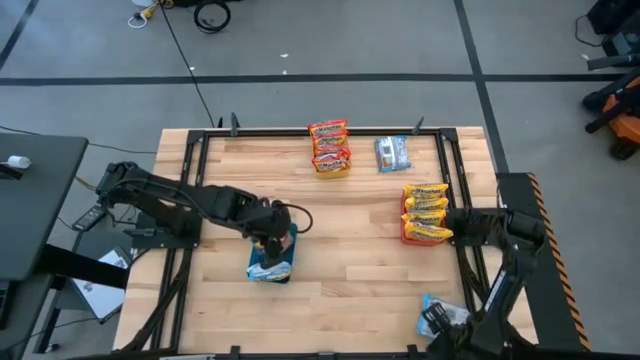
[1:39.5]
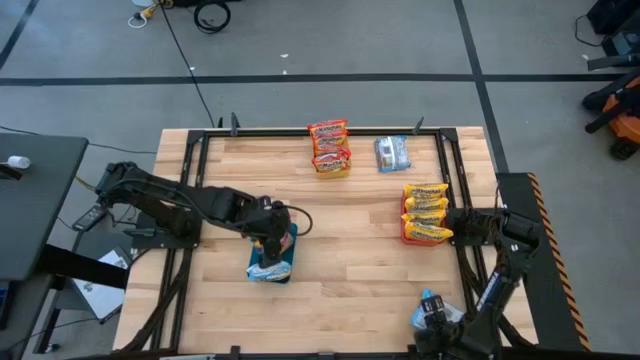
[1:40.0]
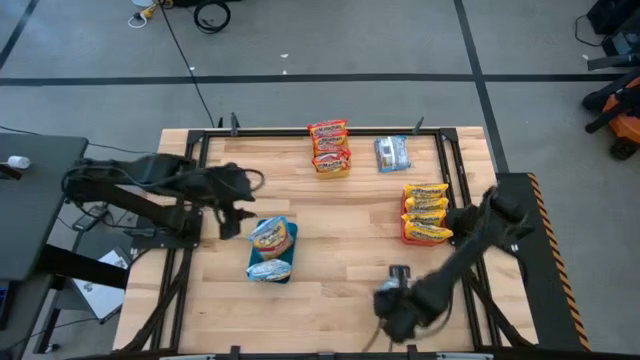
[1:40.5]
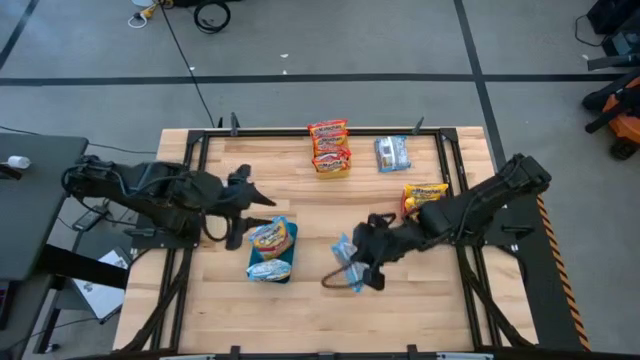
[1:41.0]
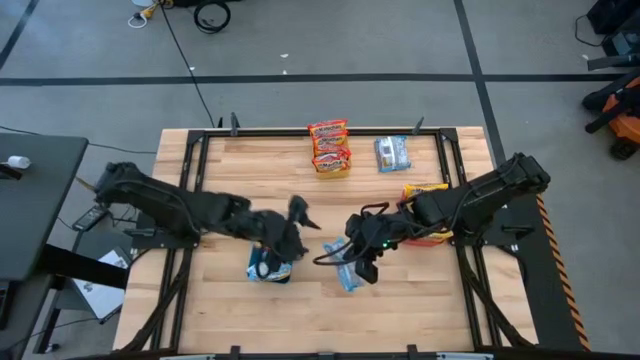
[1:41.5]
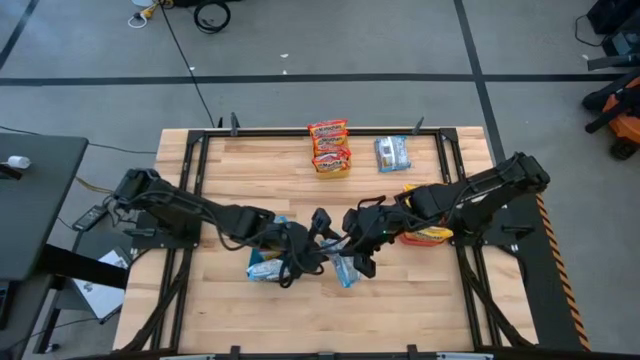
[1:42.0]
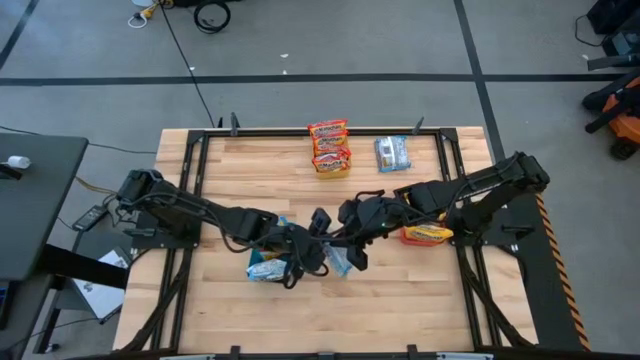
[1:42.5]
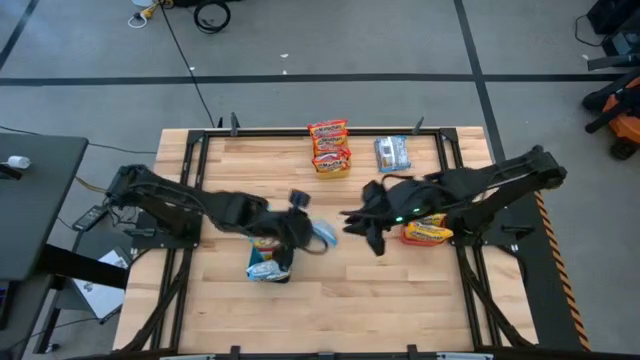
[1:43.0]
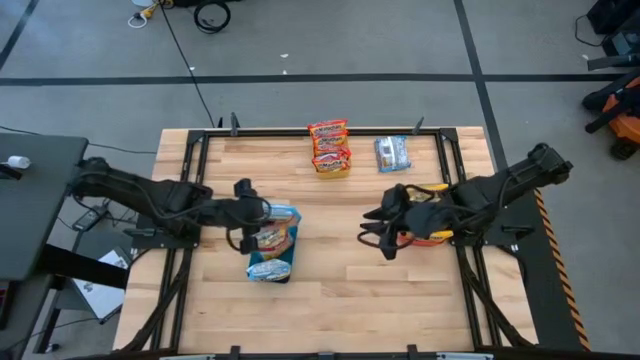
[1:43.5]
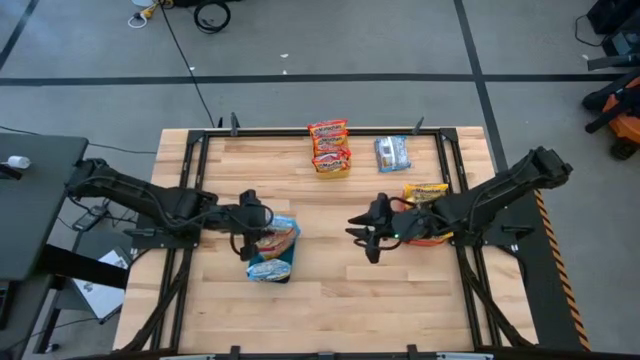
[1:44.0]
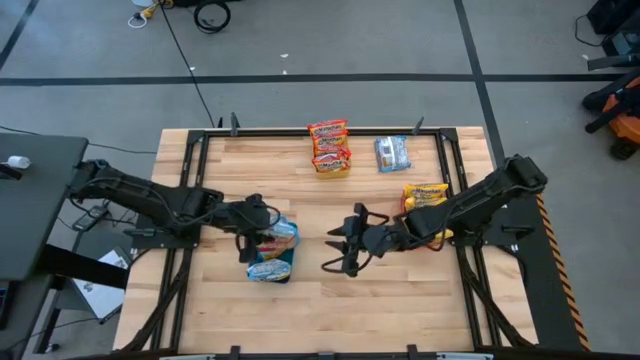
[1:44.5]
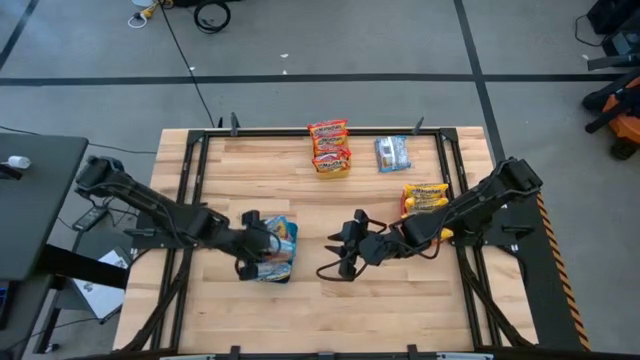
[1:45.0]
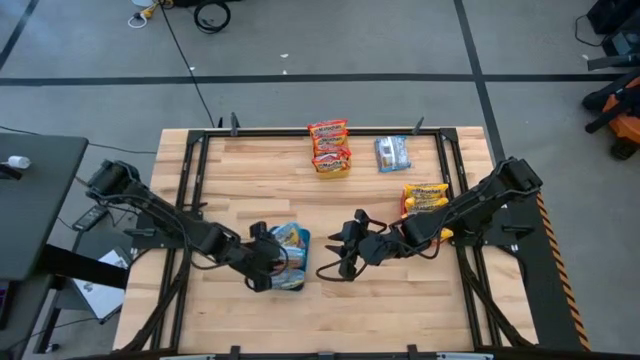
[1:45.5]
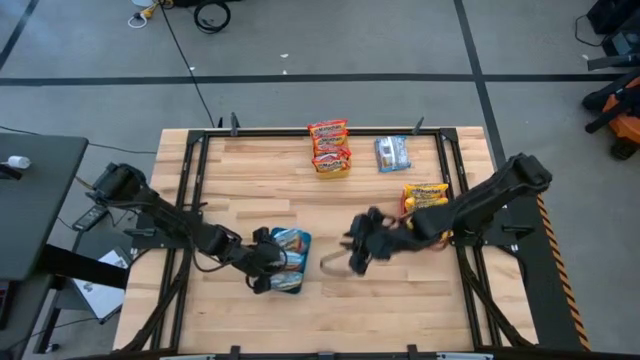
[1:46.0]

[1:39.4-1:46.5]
Task: Sort Maruchan noodles
Put the bottom blue noodle pack into the blue bin

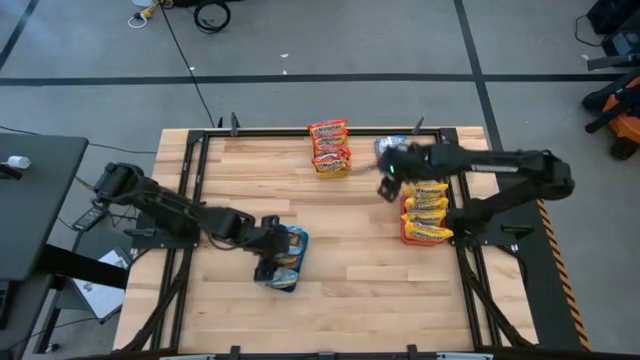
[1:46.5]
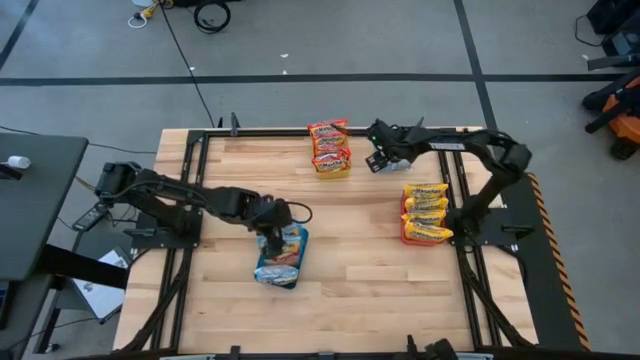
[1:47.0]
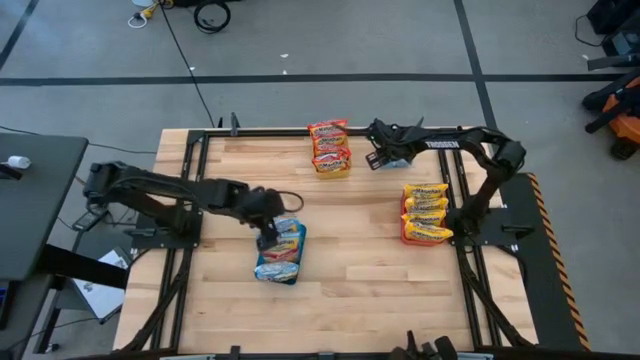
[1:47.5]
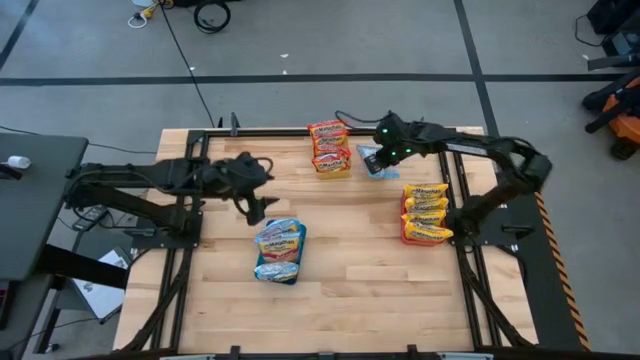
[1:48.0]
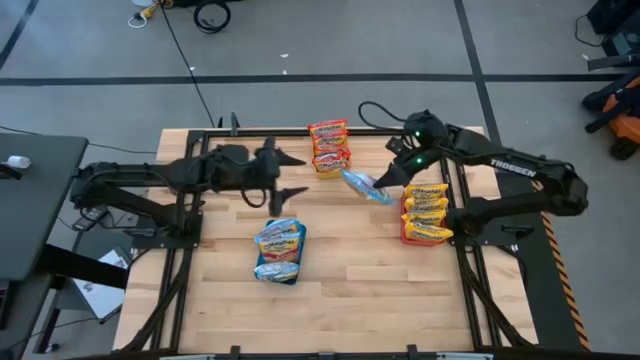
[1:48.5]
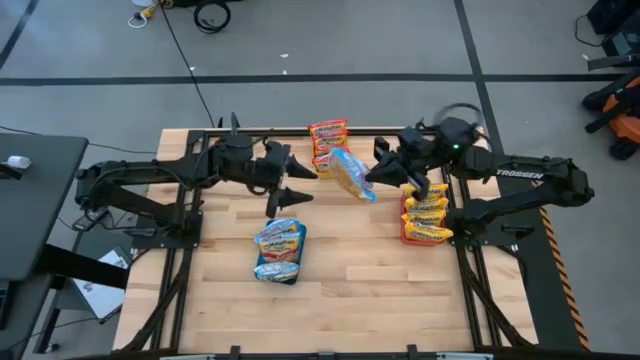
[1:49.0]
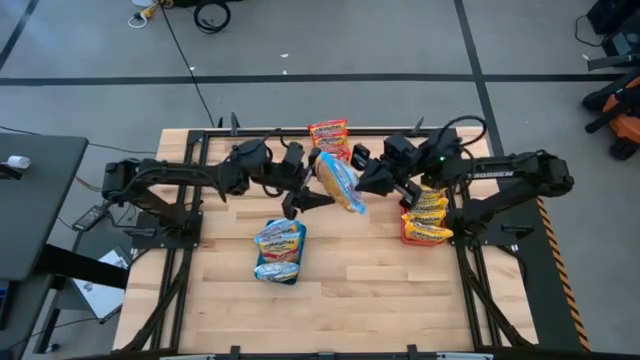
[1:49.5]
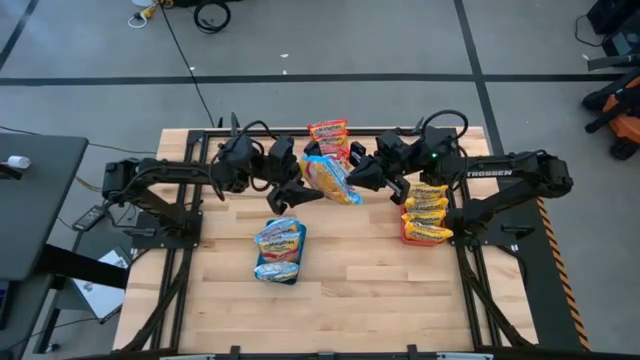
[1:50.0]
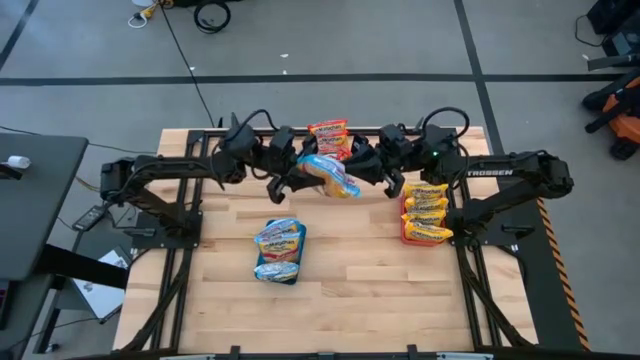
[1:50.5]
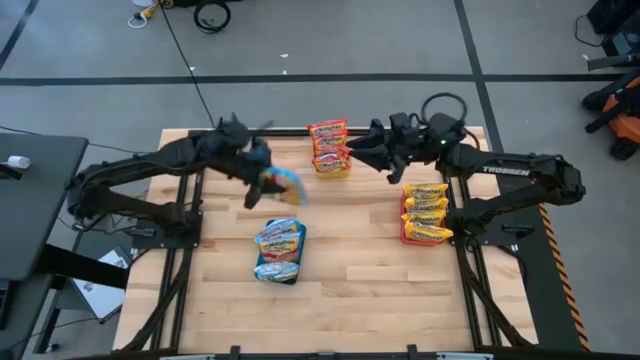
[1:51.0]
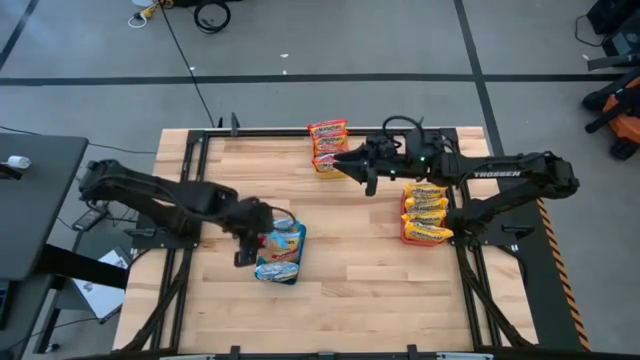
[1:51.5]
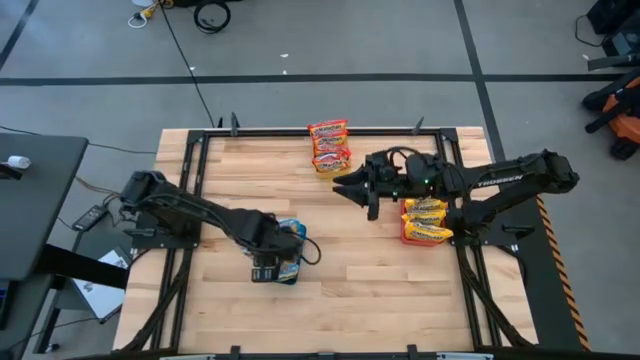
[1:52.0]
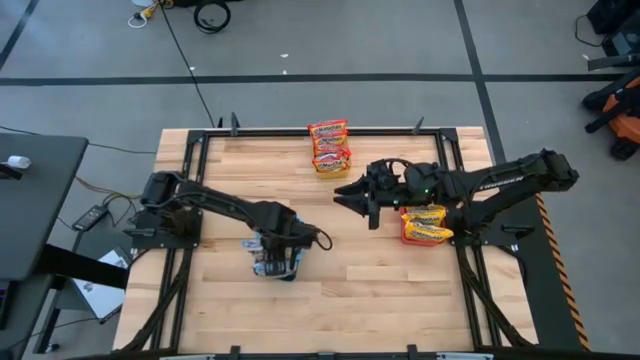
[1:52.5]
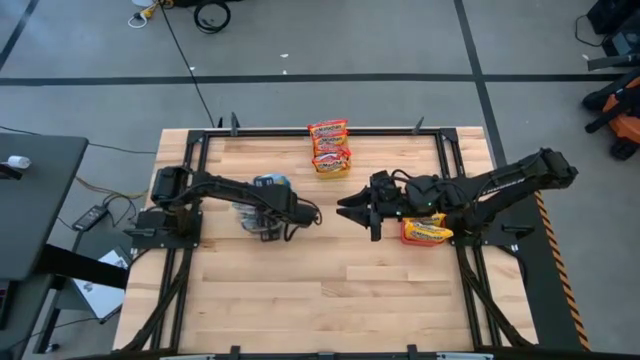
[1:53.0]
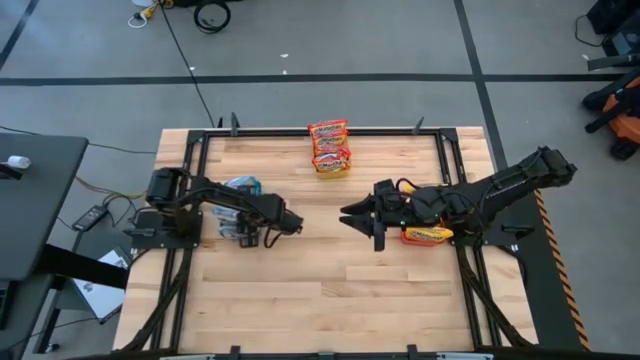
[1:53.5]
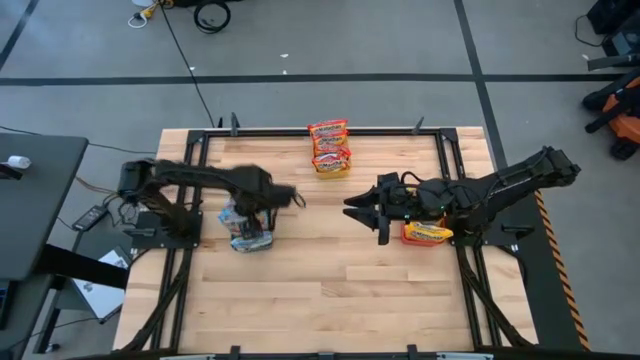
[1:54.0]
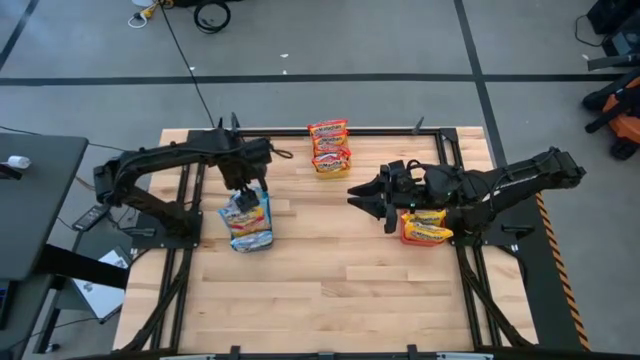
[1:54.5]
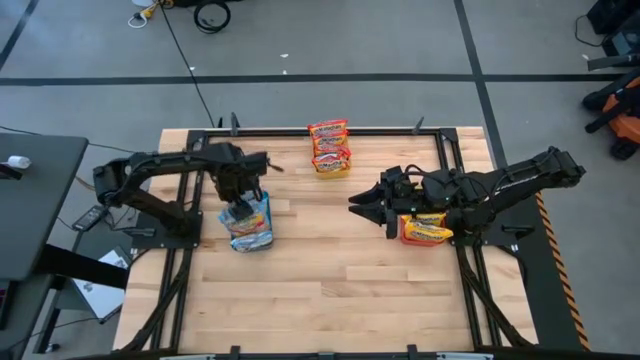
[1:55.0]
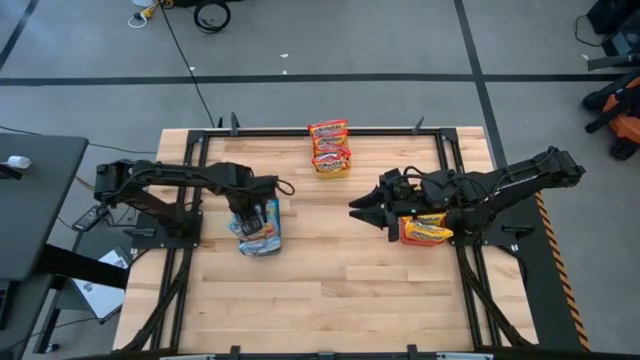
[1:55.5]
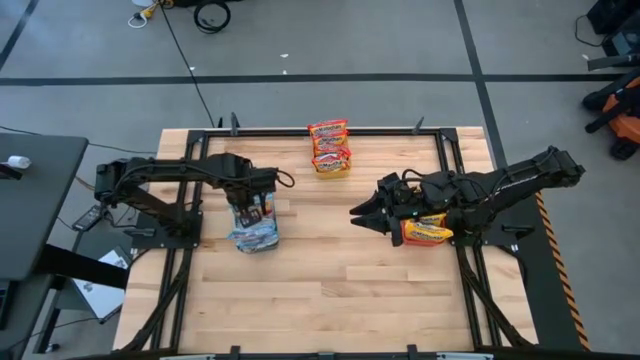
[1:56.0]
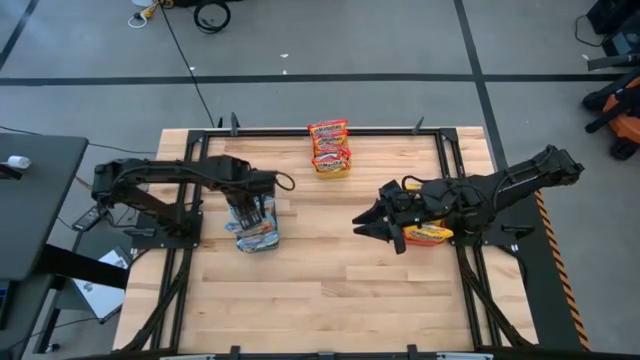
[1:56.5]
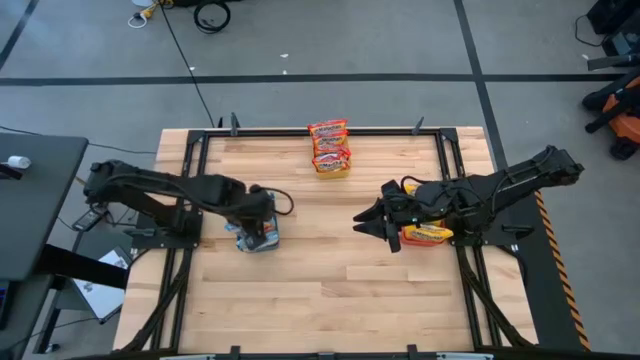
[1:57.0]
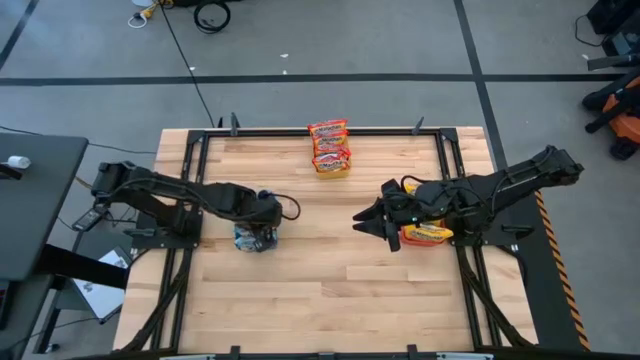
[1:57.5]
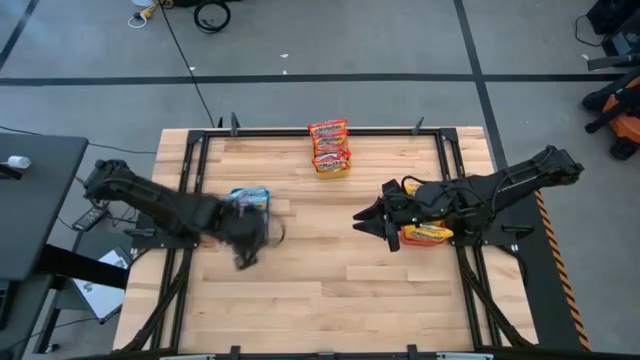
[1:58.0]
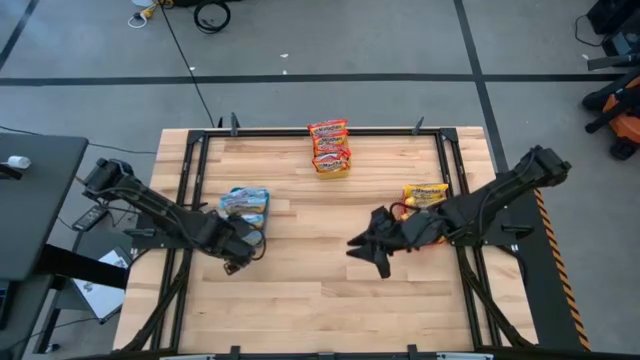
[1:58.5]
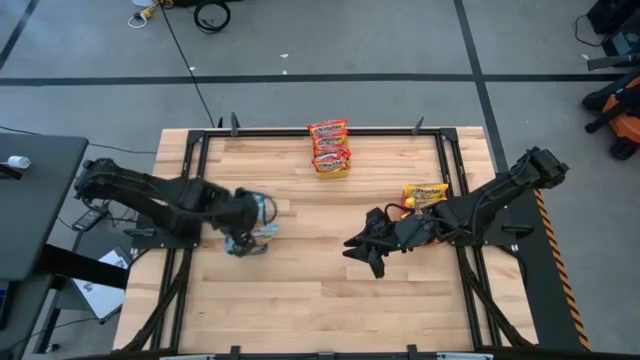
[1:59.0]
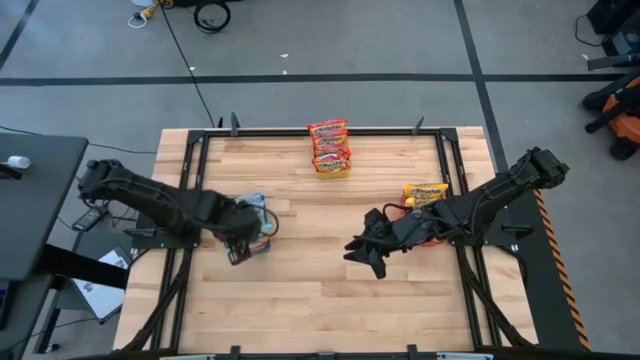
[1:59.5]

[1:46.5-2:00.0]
Put the blue noodle pack into the blue bin

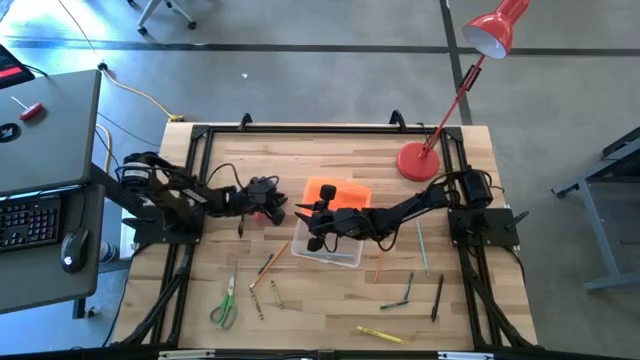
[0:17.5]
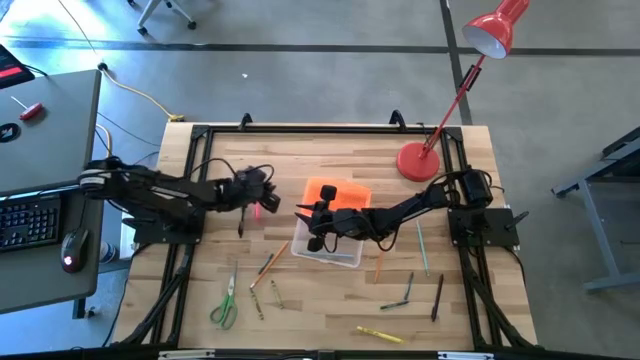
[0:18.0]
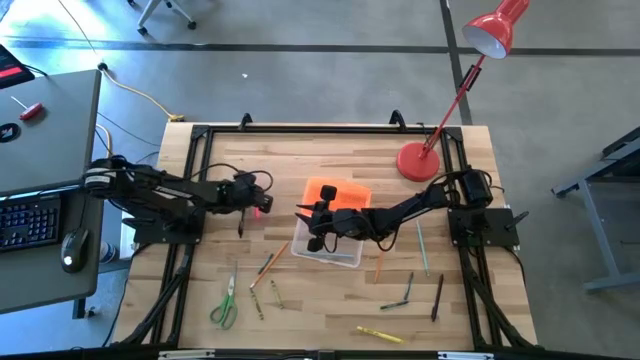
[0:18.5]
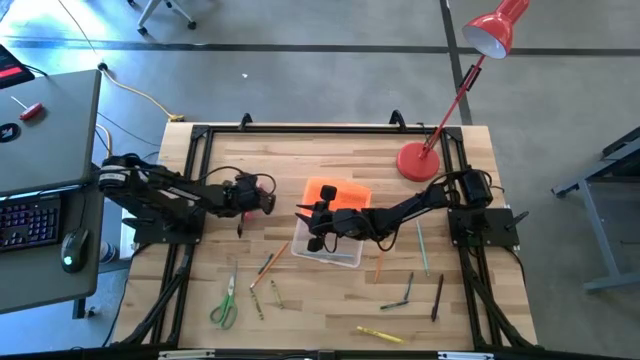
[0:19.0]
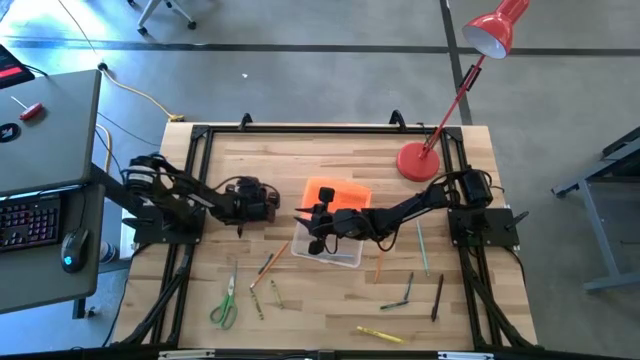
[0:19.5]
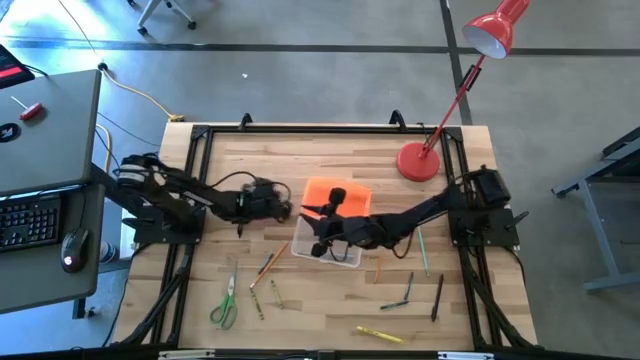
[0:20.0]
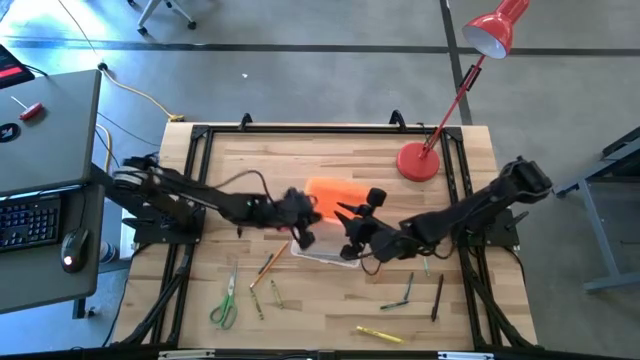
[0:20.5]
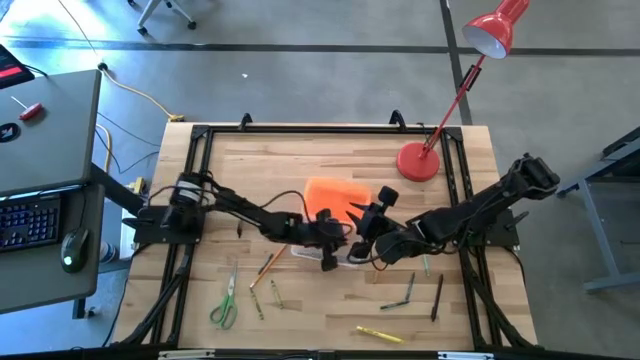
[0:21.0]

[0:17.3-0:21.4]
Task: Pick & place school supplies into a supply box
Put the pink pen into the supply box
